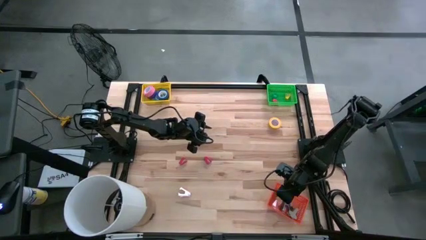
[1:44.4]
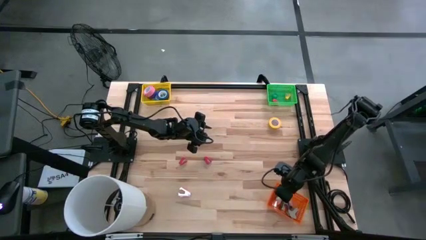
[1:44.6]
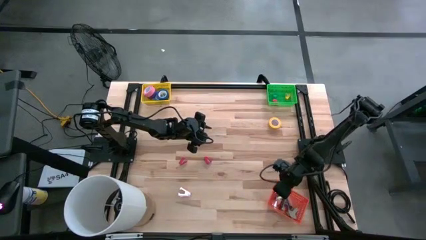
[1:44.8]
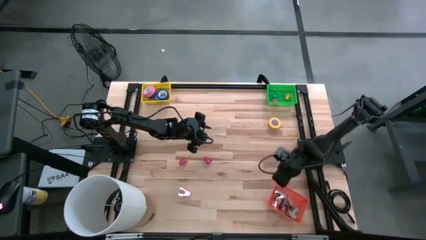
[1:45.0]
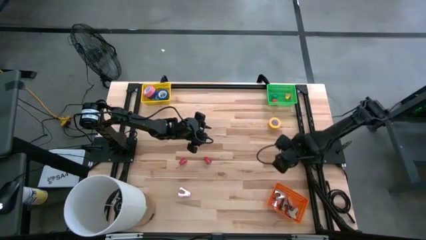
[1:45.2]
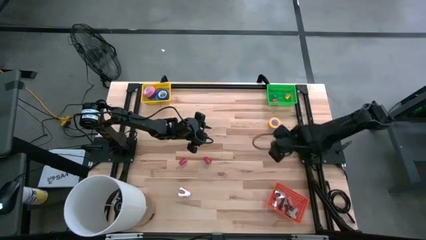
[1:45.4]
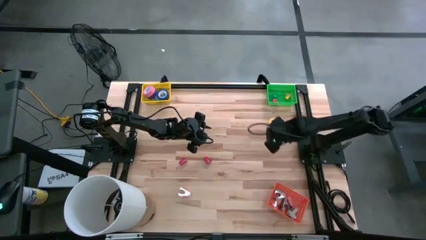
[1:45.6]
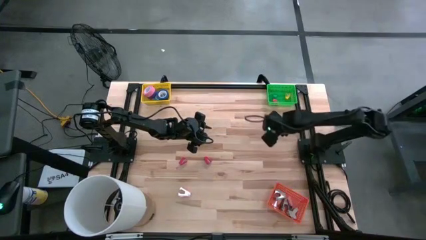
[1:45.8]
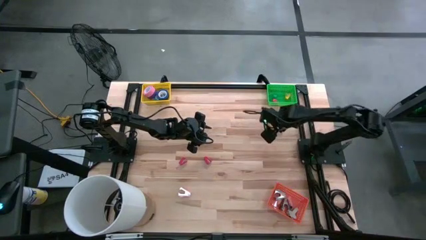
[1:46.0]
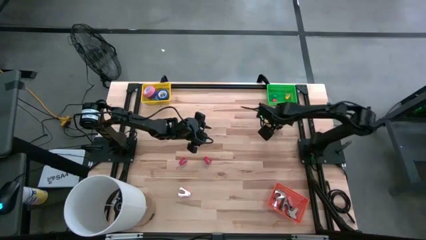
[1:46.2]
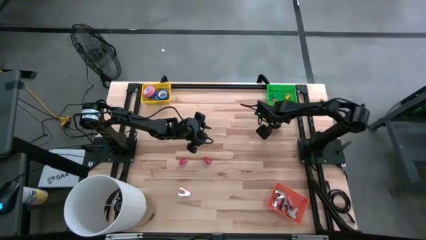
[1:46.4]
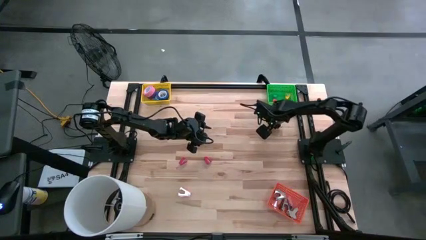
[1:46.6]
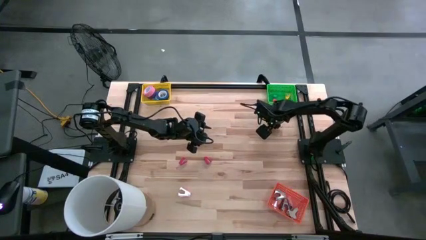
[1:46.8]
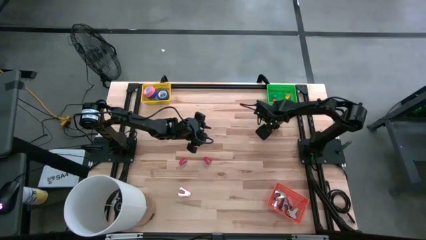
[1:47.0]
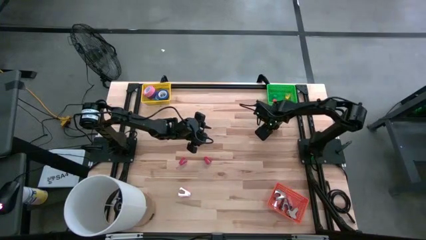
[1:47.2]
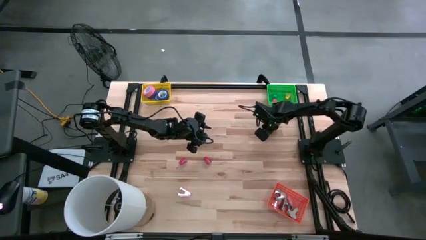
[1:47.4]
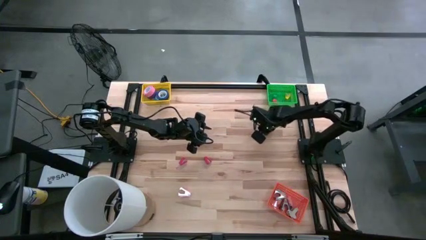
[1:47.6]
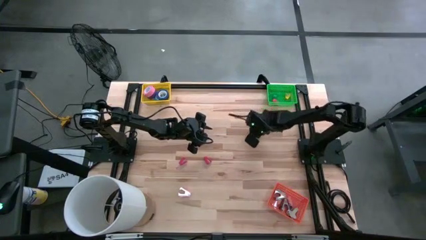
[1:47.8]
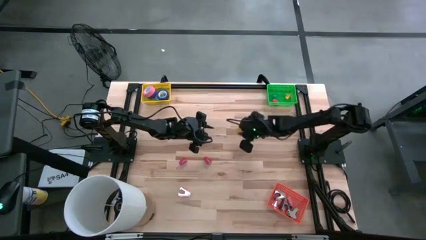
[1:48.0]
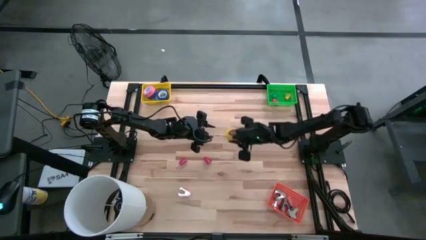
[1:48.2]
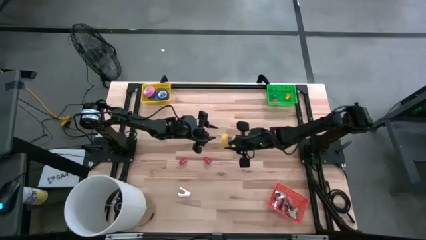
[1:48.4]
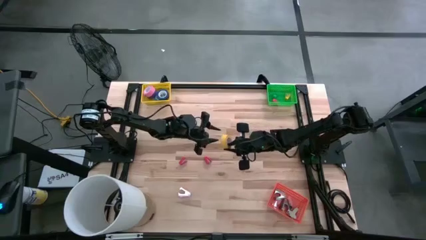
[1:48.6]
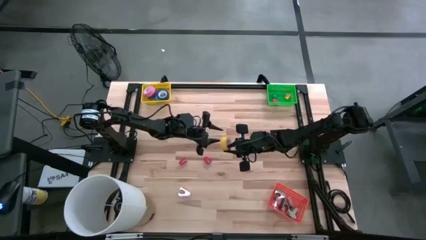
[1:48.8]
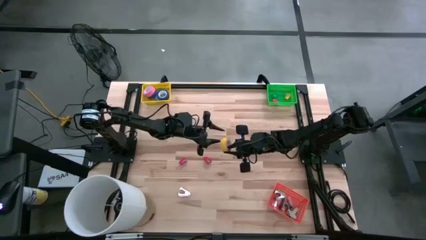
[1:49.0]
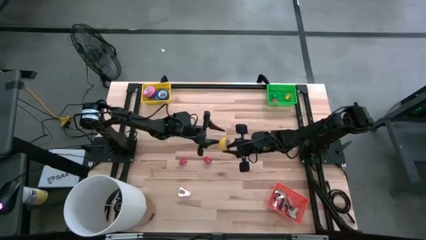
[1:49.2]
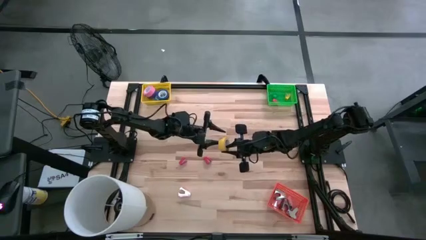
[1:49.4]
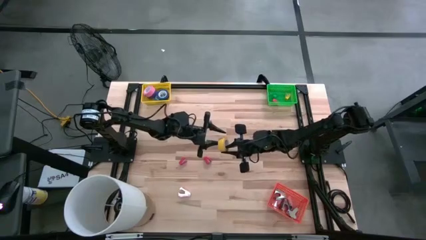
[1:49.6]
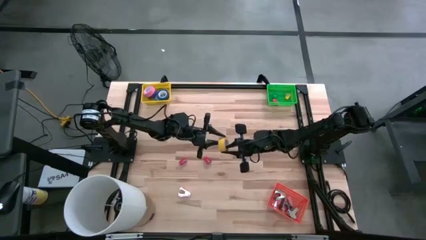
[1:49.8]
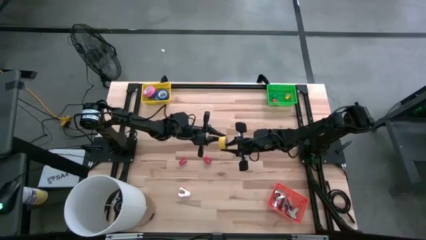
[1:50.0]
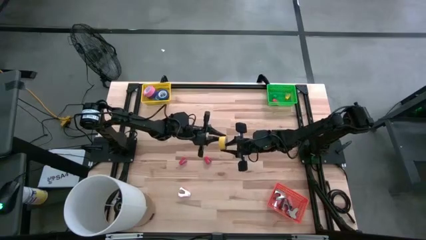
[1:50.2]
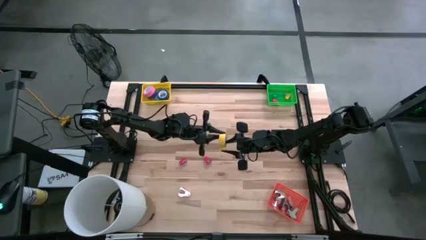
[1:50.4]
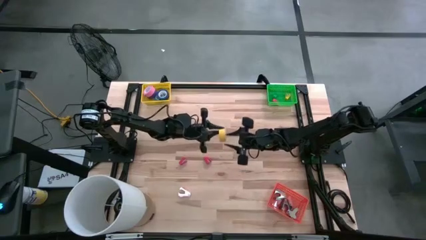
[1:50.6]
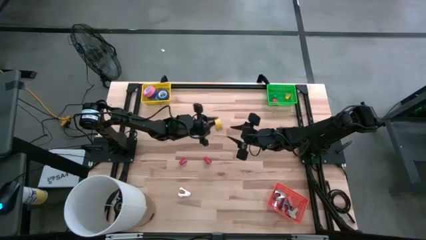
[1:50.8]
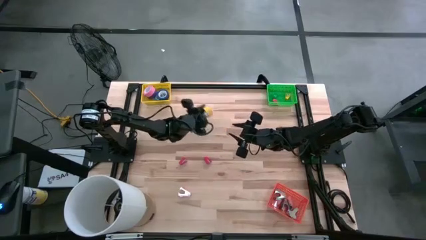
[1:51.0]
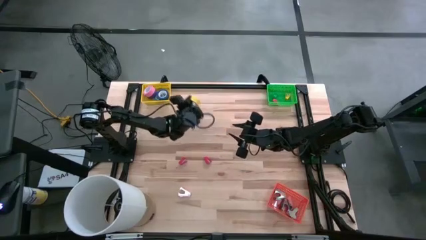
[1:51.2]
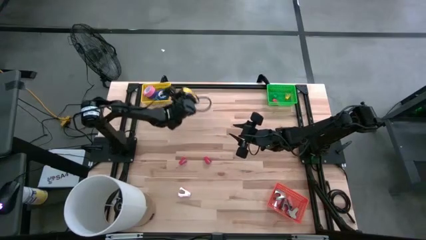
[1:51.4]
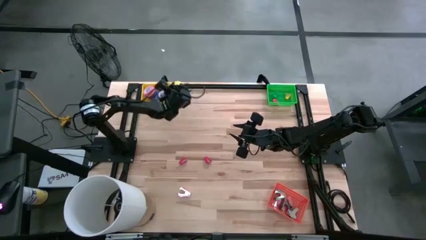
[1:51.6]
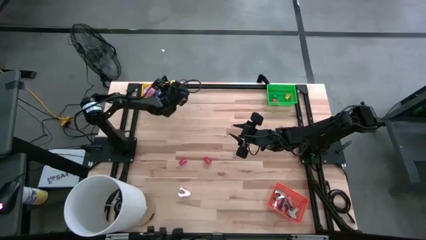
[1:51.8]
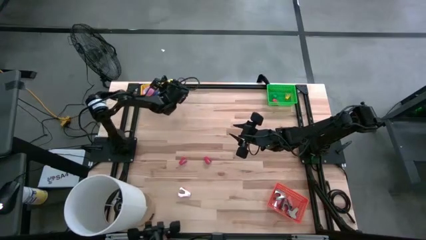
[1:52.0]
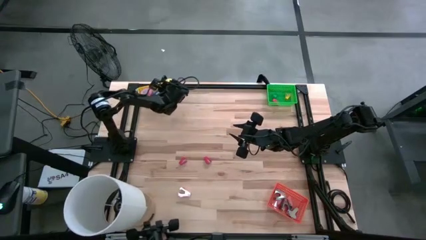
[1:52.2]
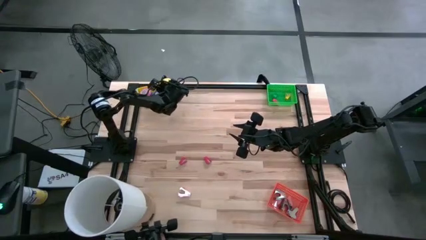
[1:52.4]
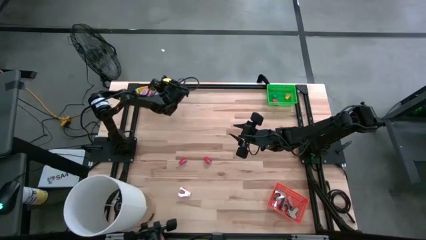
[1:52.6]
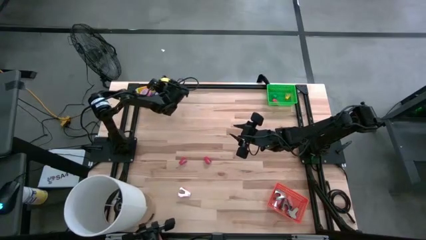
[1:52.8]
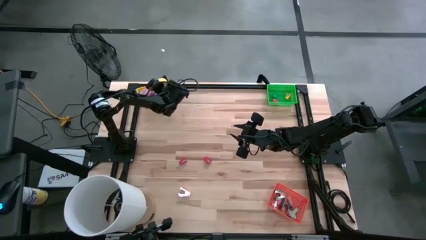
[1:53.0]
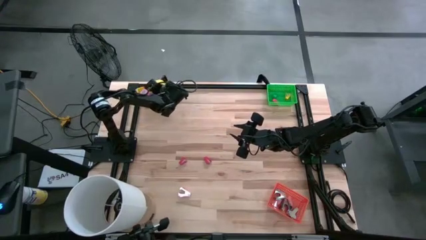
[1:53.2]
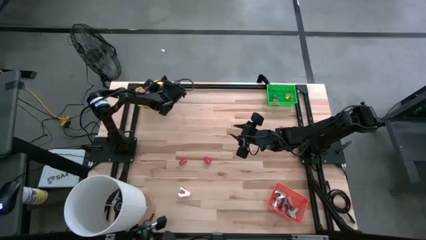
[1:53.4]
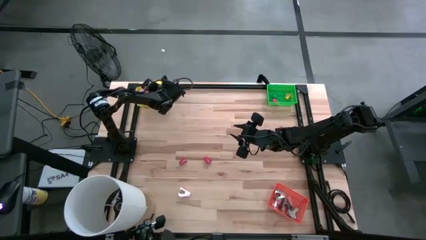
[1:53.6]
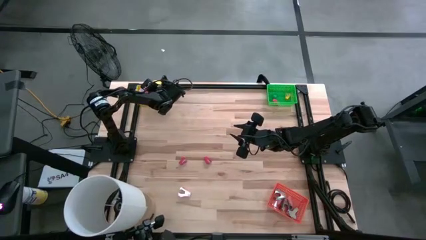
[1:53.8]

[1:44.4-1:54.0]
Task: Pick and place Stapler, Stapler remover, tape
Put the yellow tape into the yellow bin

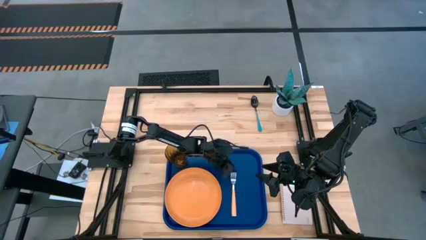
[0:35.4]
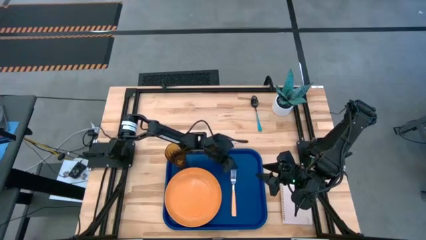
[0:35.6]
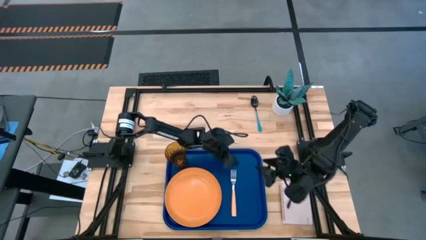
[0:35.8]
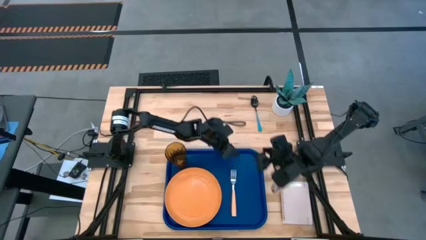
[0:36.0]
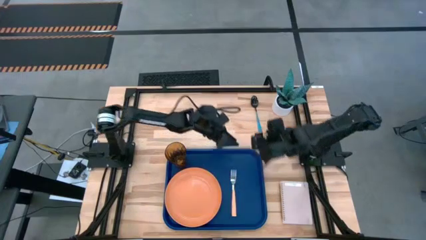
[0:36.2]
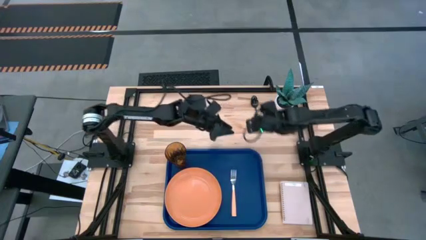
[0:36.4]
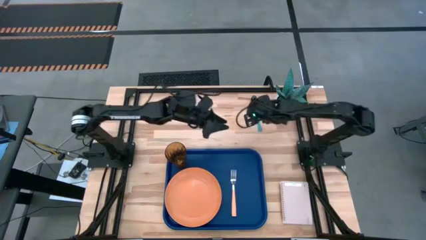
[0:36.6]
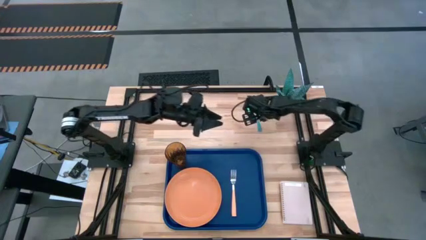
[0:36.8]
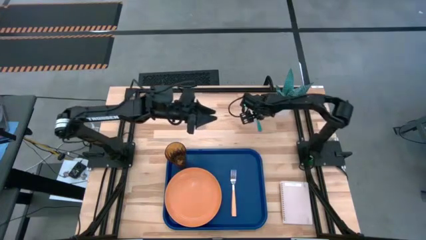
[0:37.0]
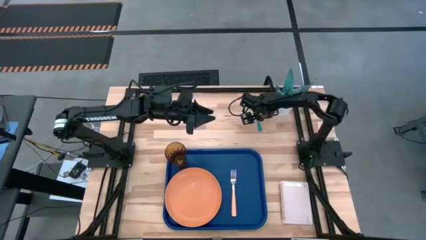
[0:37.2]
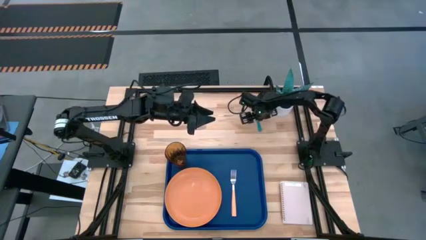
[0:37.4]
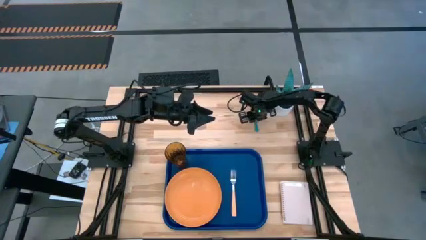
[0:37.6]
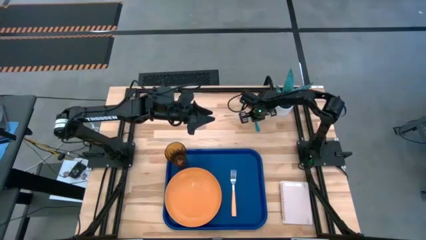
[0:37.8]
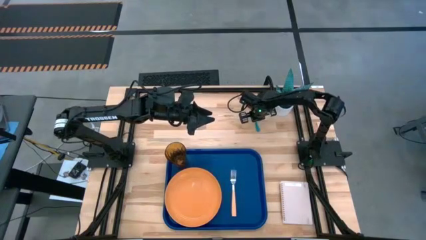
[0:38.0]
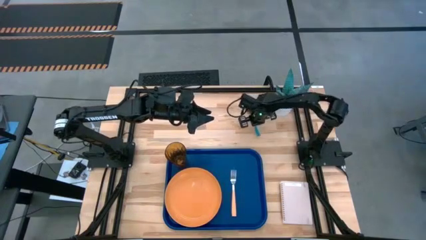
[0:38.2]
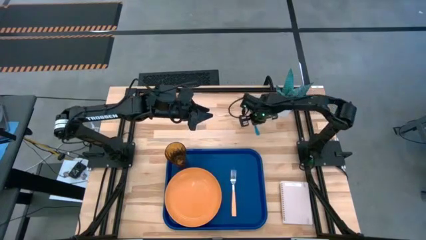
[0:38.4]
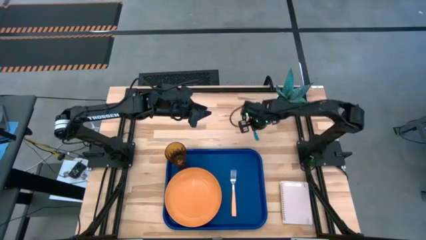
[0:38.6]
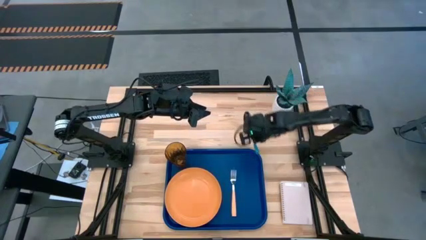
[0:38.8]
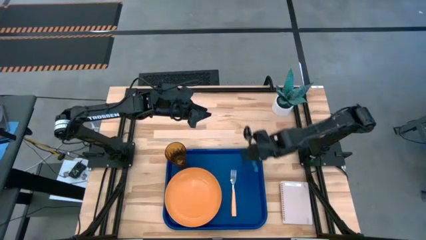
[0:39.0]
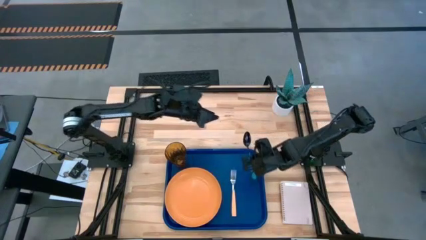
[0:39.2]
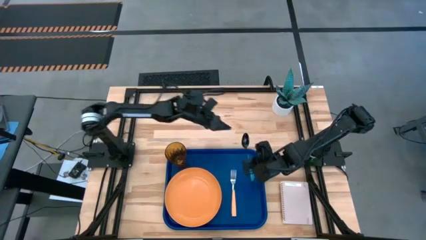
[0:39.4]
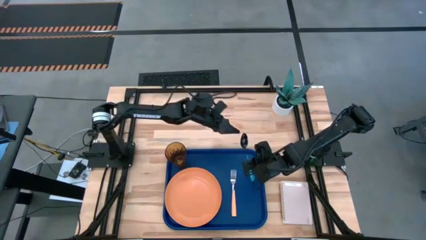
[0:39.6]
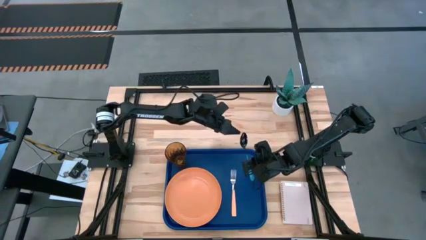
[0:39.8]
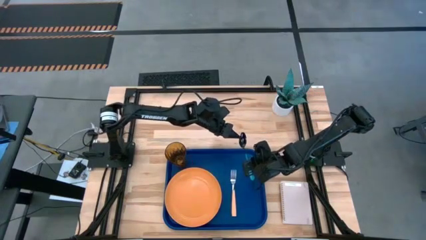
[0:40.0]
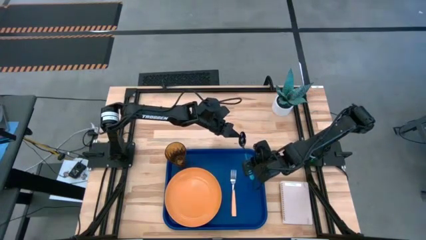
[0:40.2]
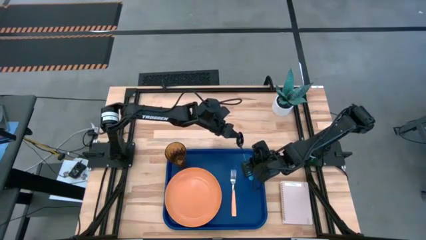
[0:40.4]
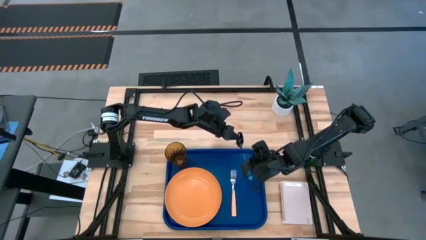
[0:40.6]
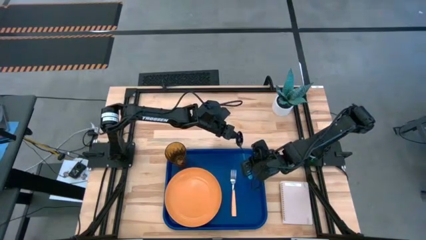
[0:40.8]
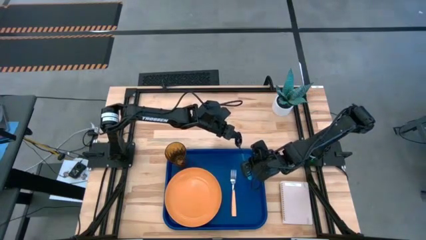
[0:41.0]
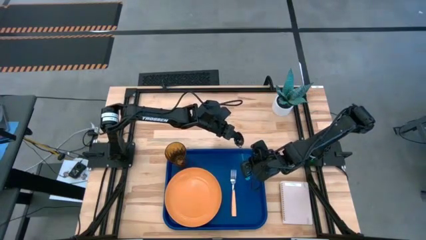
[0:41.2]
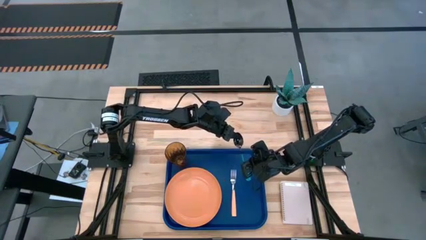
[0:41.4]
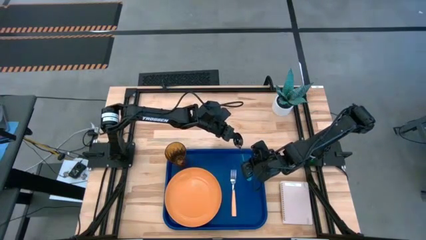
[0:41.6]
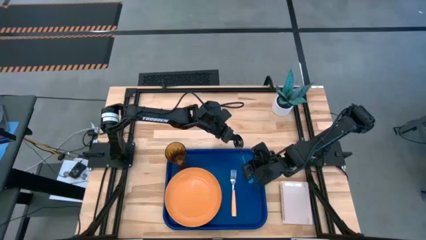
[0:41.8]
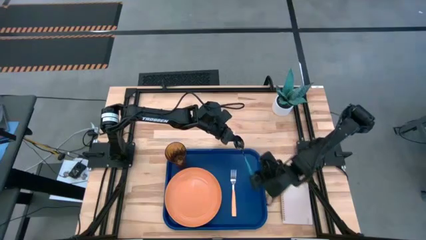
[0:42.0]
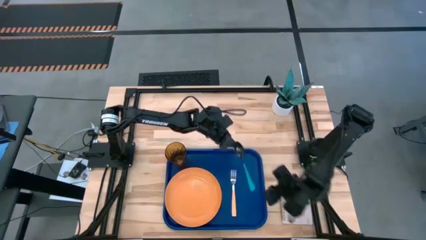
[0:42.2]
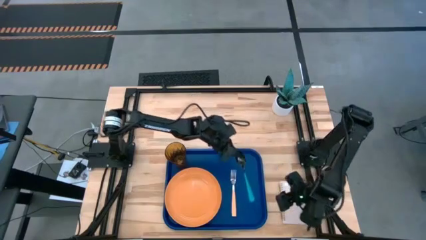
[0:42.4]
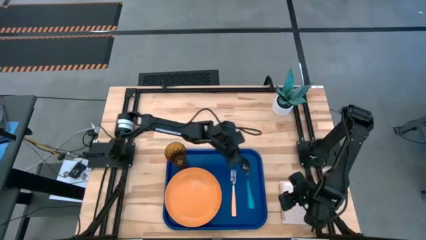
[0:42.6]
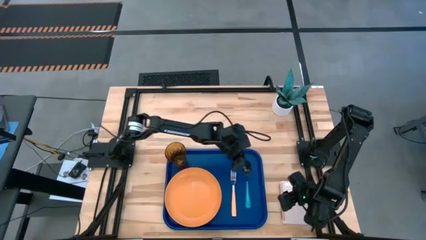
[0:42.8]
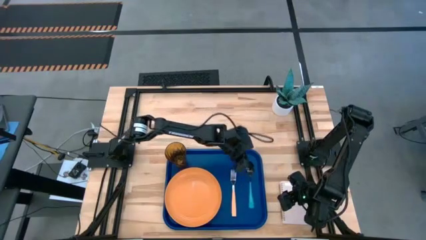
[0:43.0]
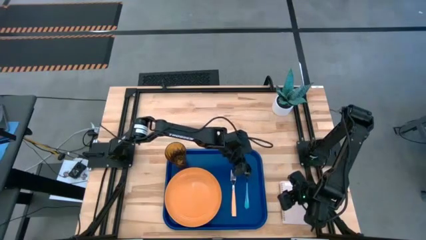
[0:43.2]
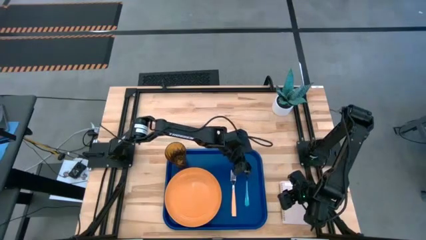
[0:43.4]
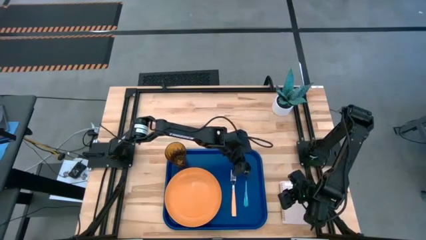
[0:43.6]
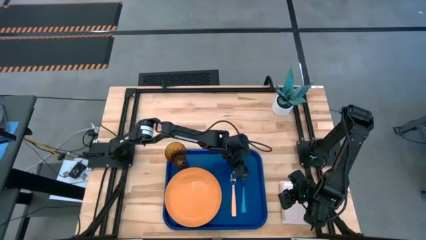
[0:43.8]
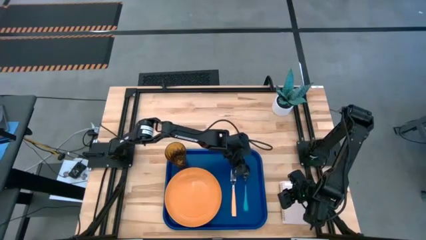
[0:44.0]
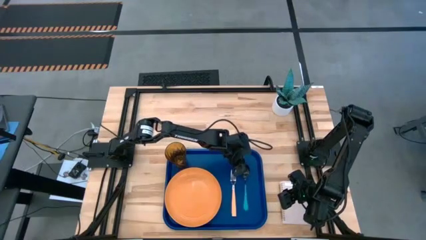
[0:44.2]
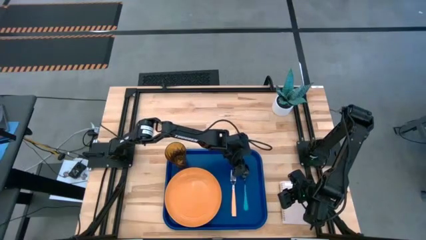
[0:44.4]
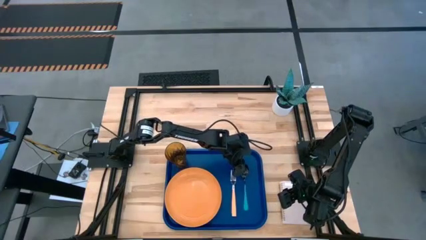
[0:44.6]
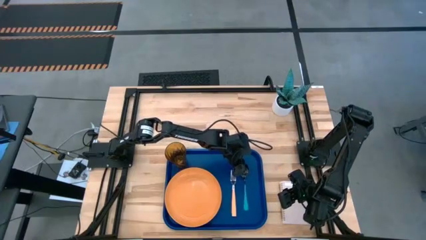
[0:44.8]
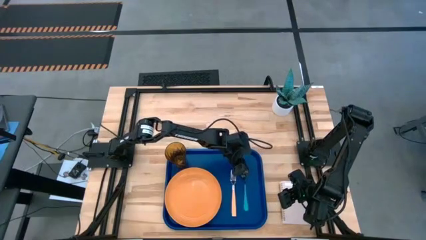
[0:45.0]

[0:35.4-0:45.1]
Task: Pick and place plate/cup/fork/spoon on tray
Put the blue spoon on the blue serving tray to the right of the brown fork
